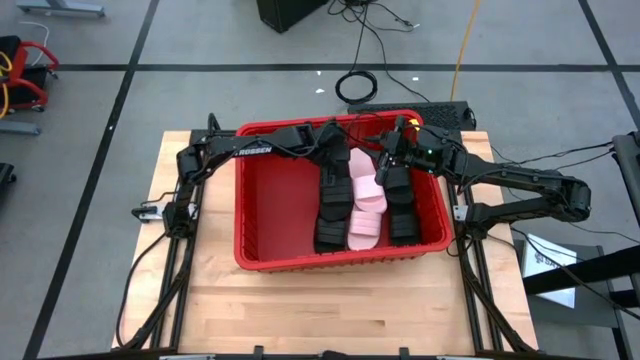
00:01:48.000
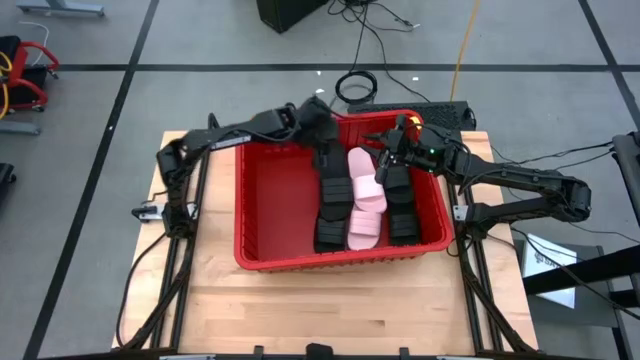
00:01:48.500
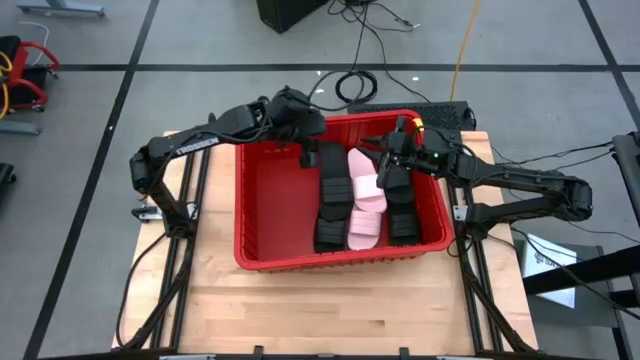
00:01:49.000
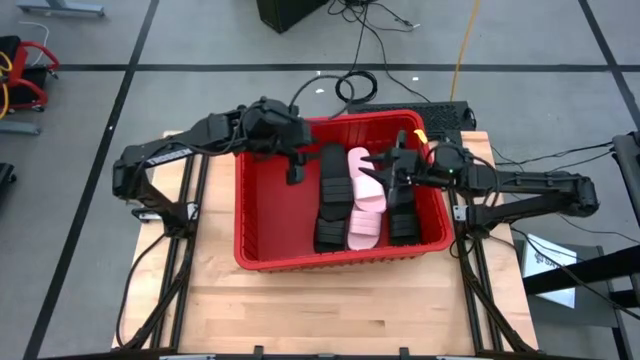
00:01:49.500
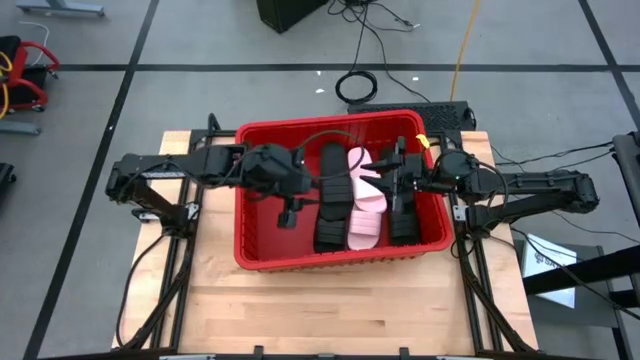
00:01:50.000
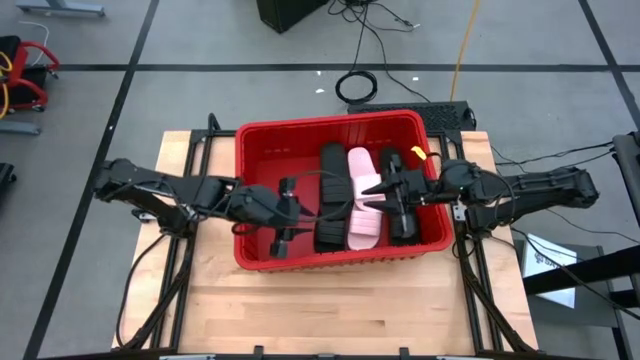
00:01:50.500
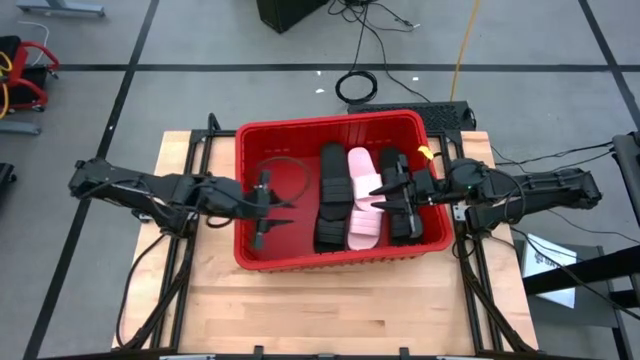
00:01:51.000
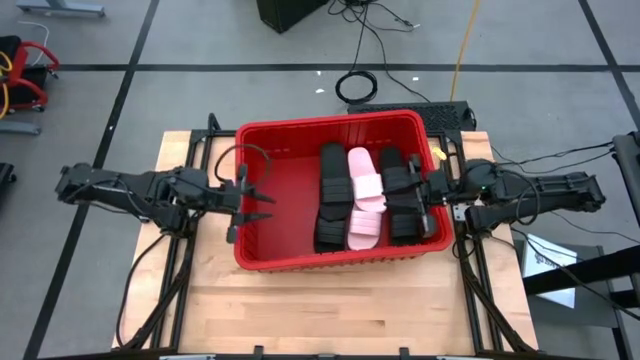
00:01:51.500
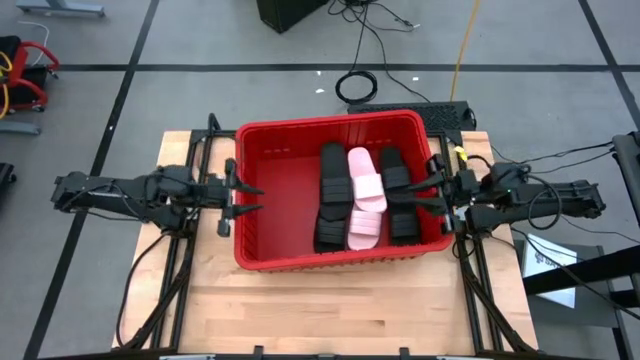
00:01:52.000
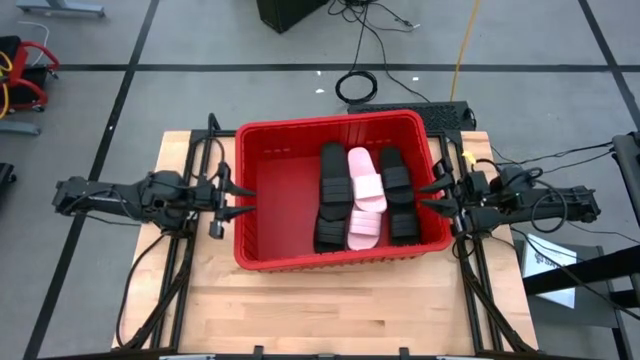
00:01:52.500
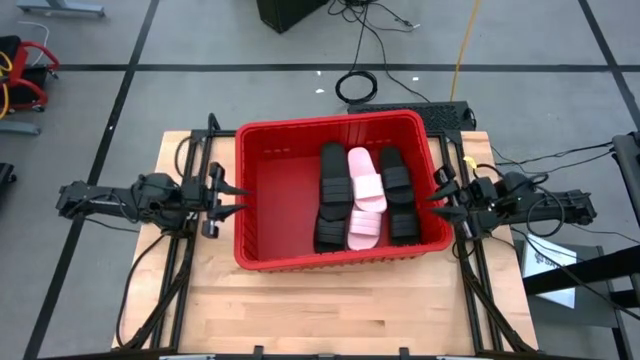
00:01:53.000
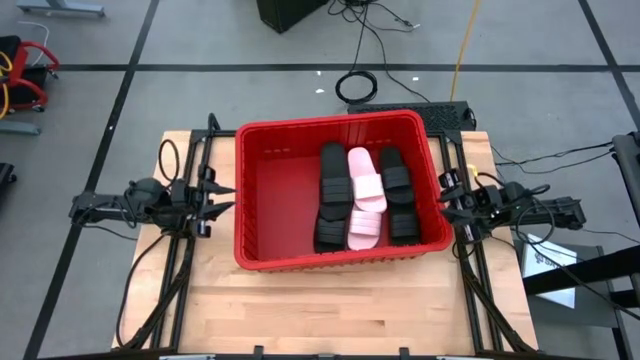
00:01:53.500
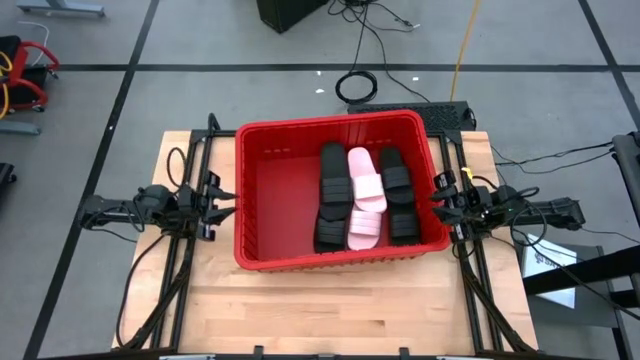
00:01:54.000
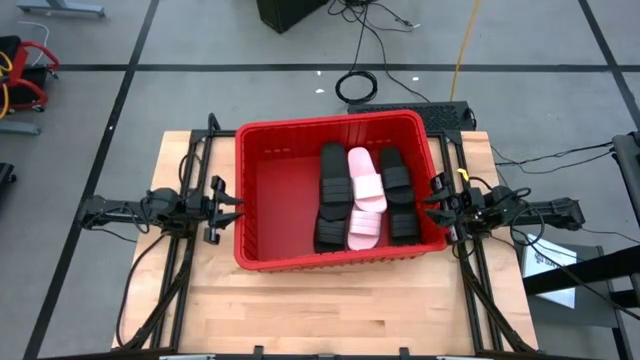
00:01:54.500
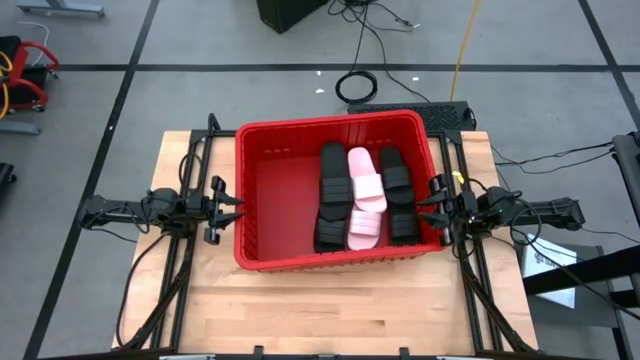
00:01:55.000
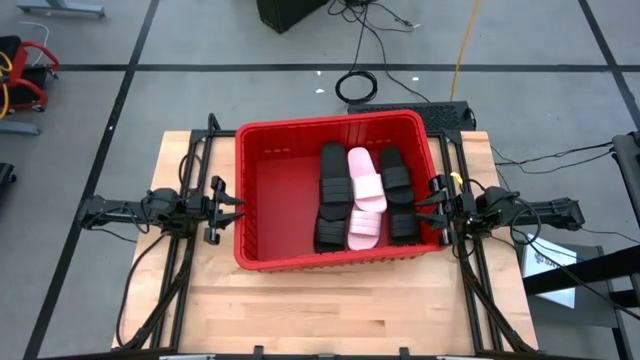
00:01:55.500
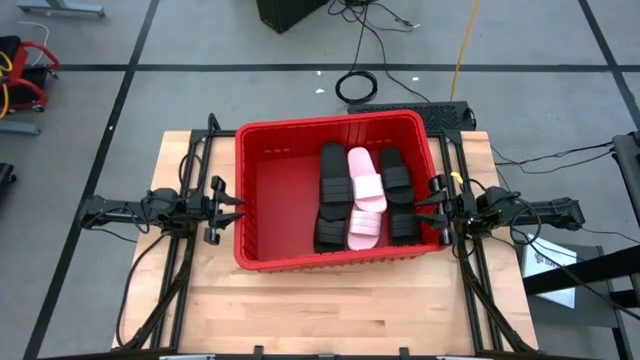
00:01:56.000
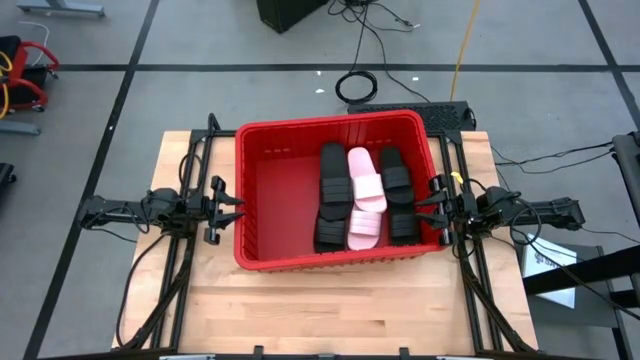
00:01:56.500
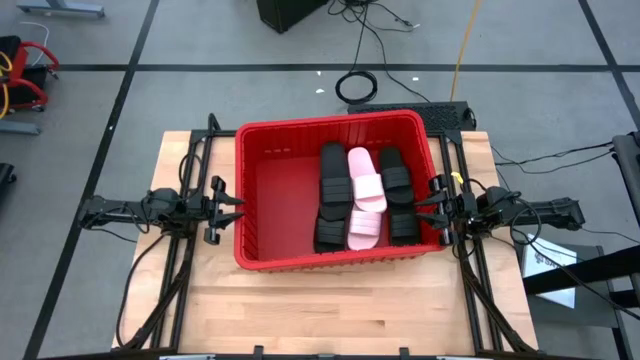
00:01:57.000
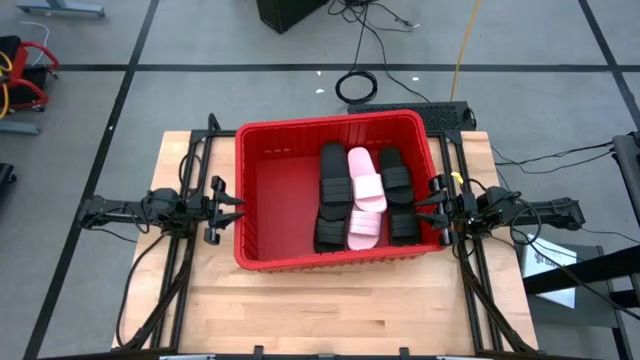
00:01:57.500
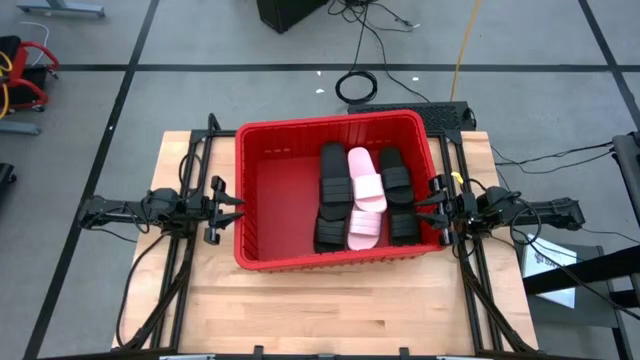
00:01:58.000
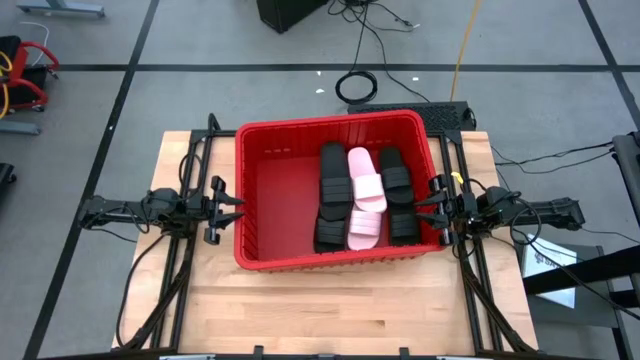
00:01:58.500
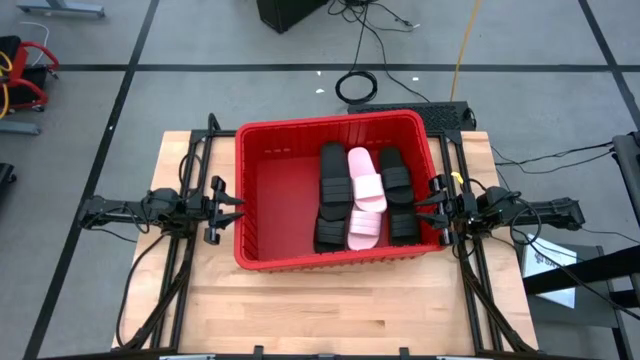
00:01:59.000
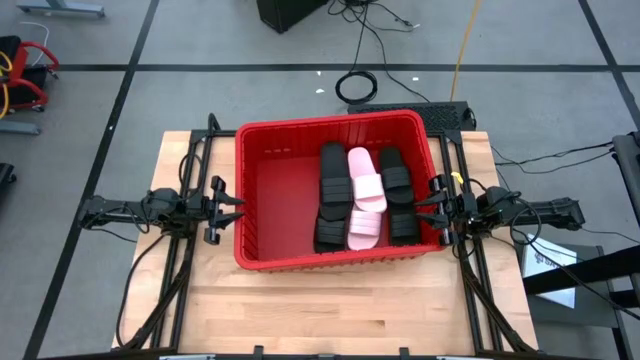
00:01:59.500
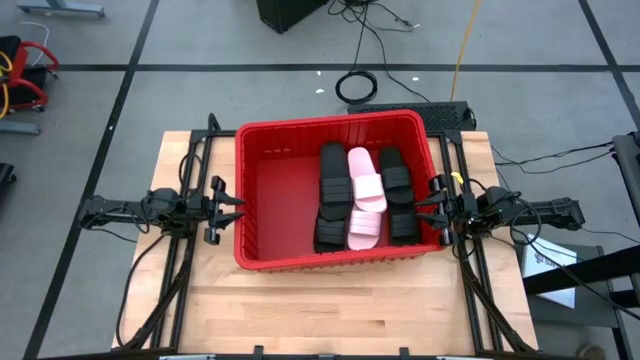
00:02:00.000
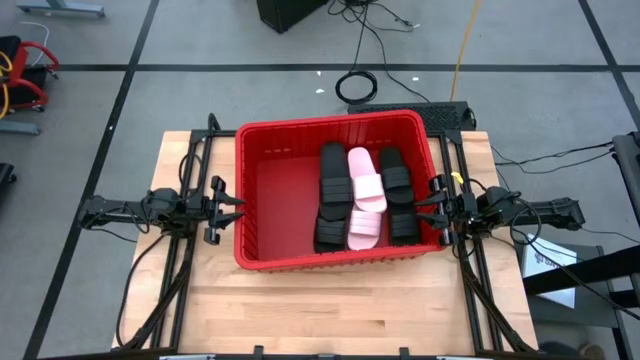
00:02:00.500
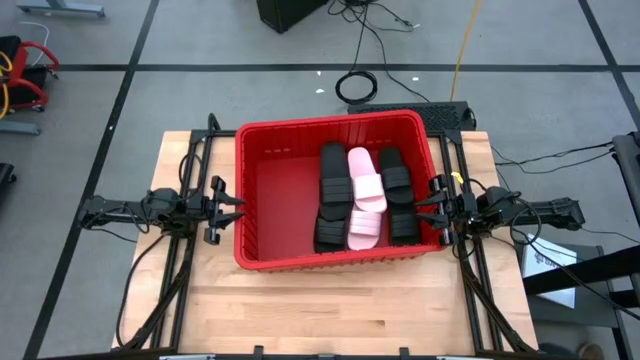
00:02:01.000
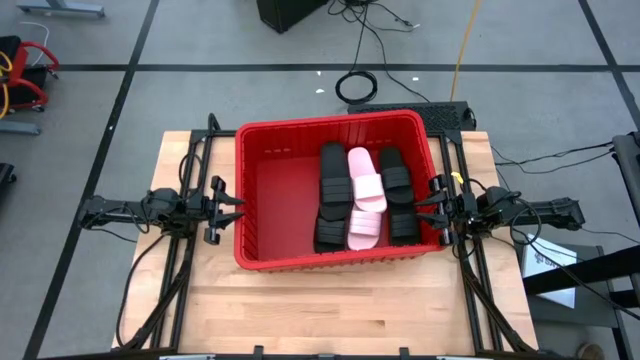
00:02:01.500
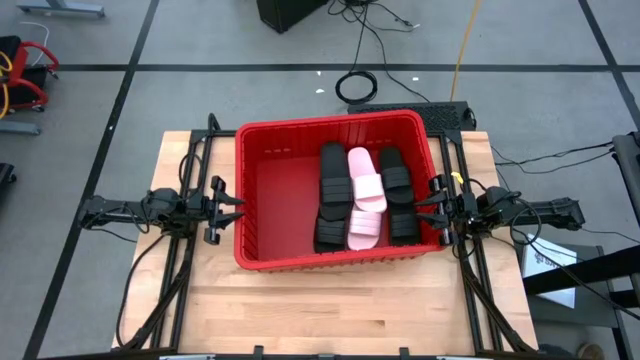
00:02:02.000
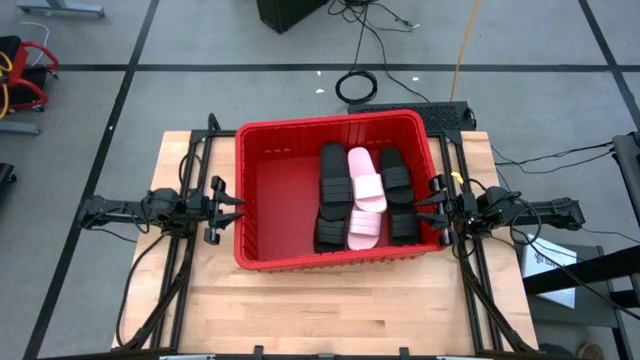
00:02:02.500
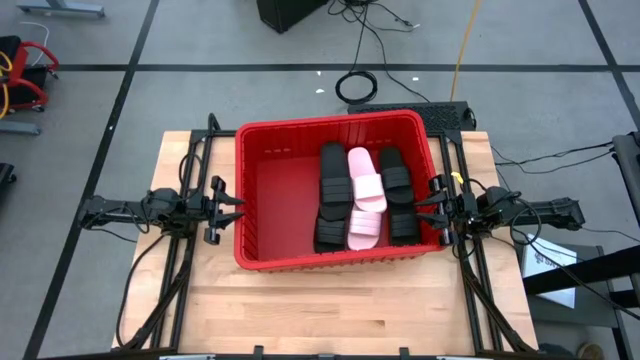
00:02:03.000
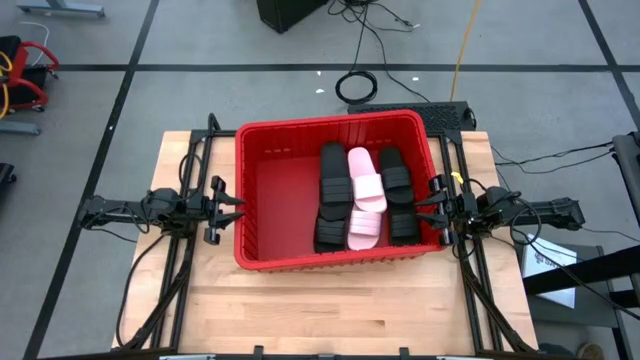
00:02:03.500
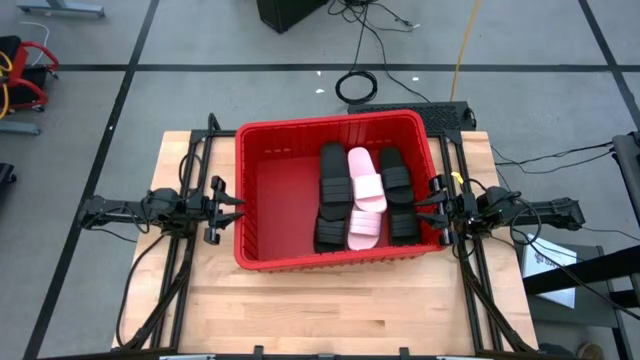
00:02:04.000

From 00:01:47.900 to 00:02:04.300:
Task: Pick and place slides into bin
Return to Home Position

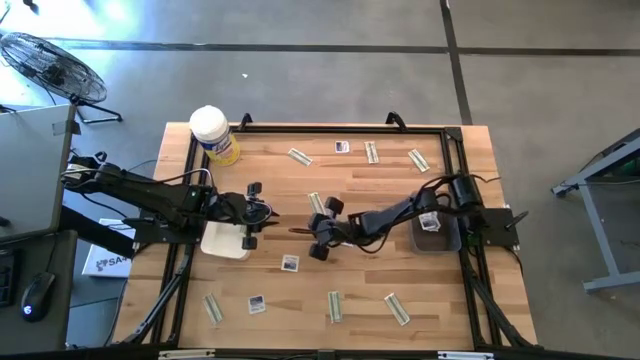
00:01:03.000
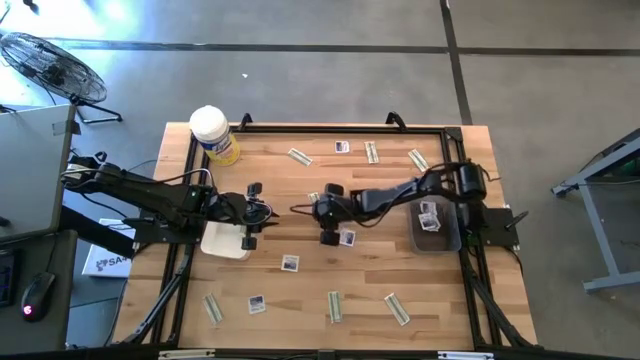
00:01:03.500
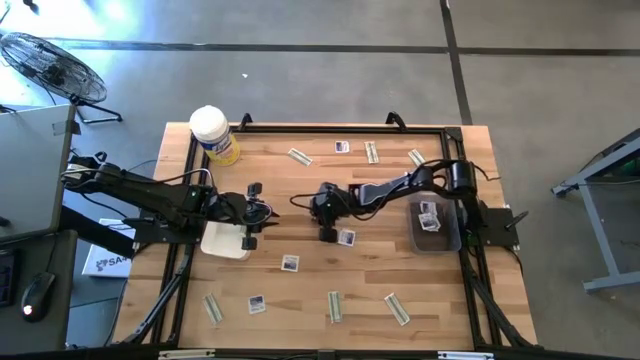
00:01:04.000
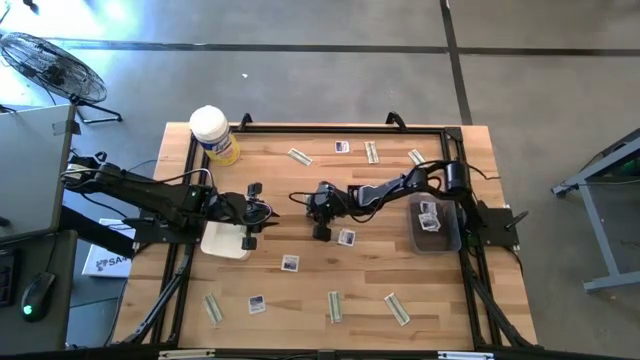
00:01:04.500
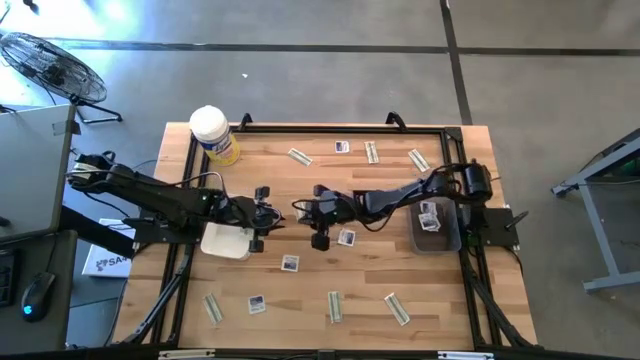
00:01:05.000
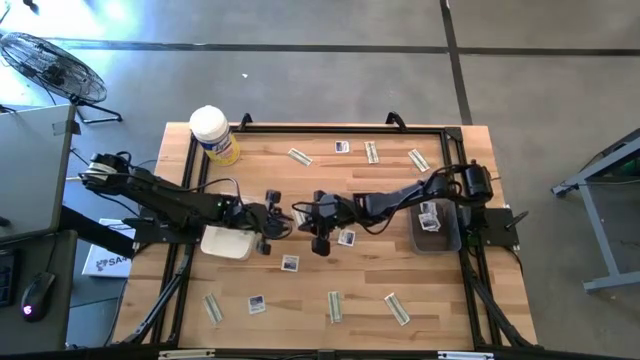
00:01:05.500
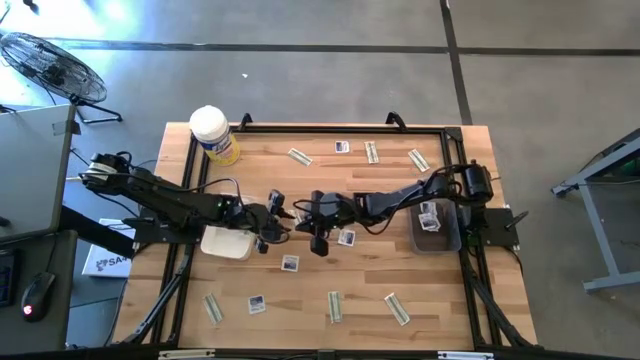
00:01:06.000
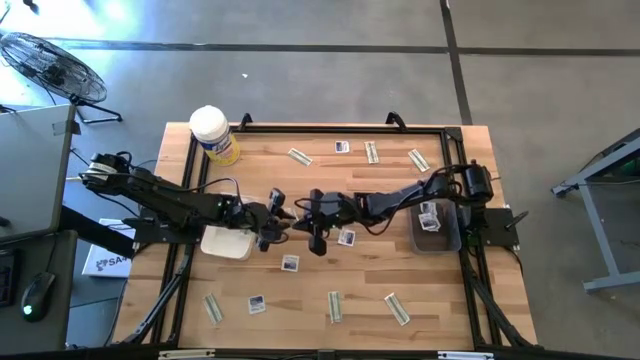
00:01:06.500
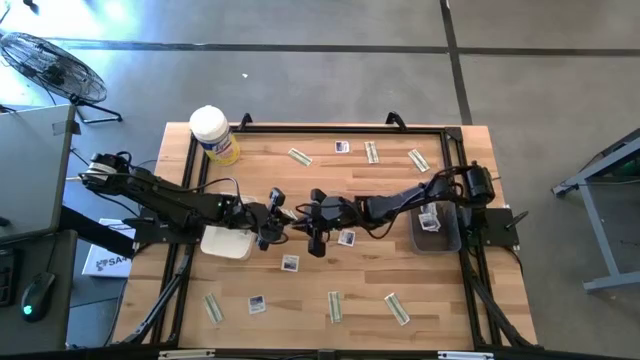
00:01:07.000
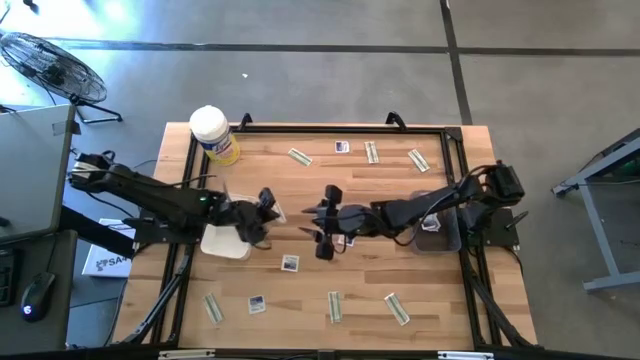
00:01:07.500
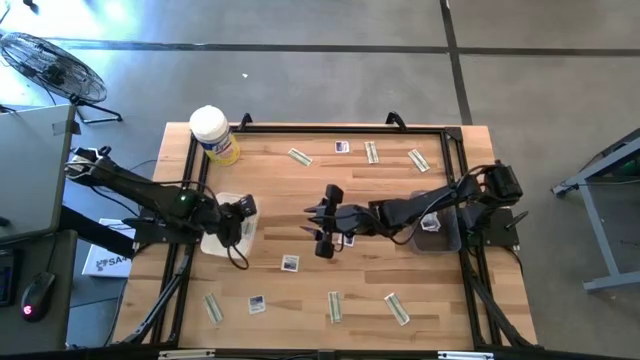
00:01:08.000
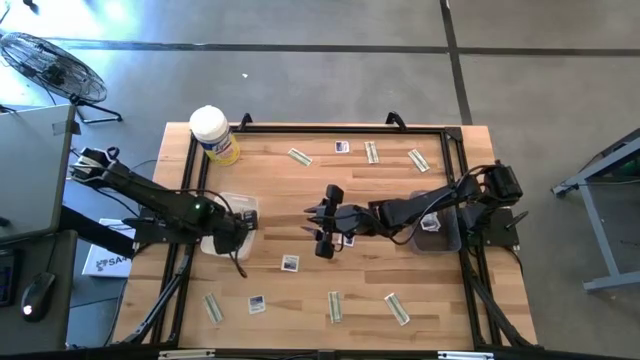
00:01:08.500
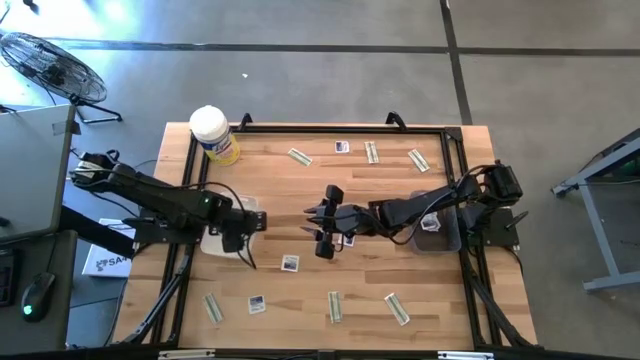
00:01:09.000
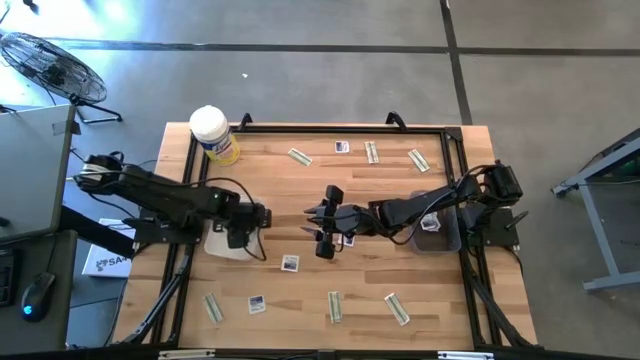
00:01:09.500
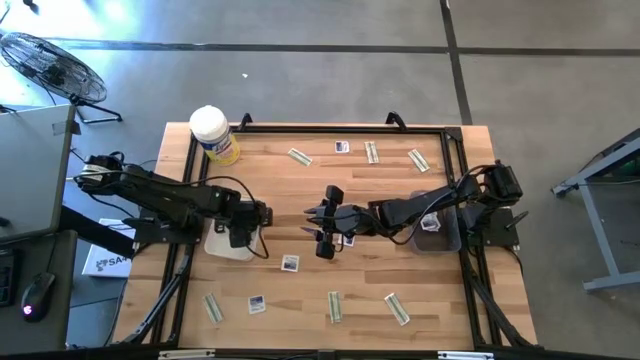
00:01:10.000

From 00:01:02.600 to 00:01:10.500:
Task: Pick & Place First Aid Supplies
Put the green bandage into the white bin
